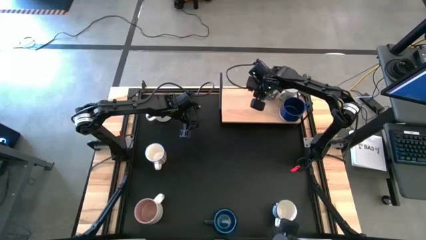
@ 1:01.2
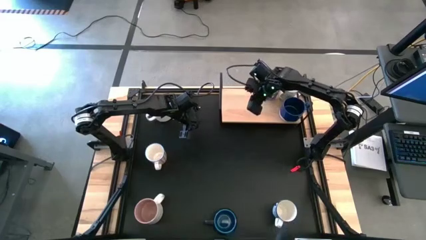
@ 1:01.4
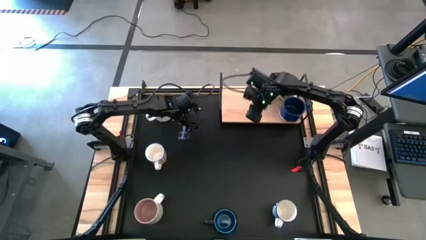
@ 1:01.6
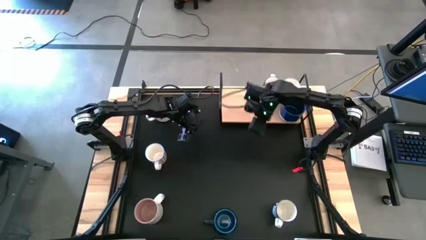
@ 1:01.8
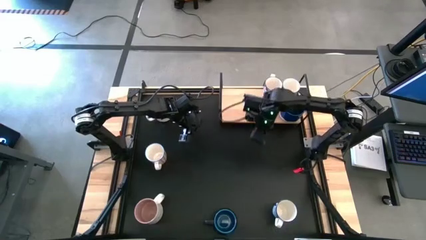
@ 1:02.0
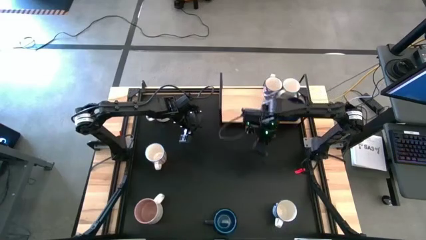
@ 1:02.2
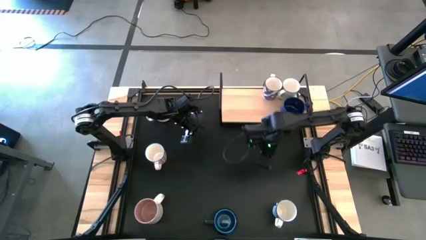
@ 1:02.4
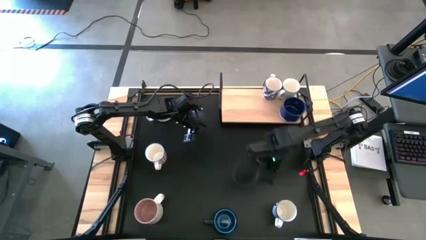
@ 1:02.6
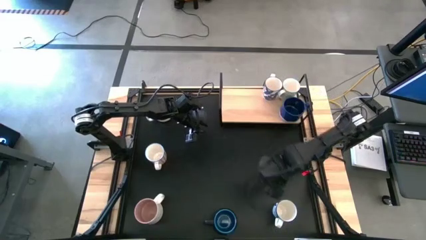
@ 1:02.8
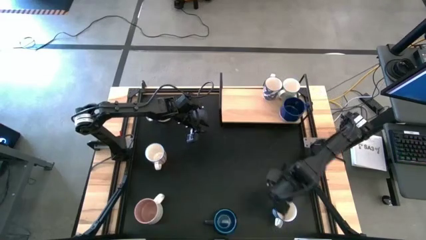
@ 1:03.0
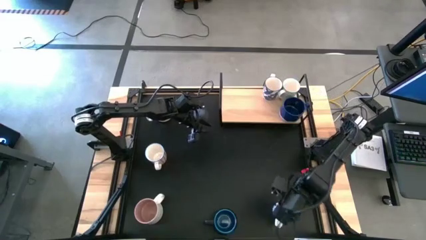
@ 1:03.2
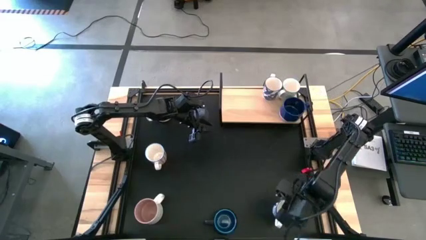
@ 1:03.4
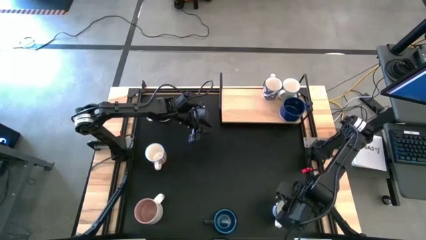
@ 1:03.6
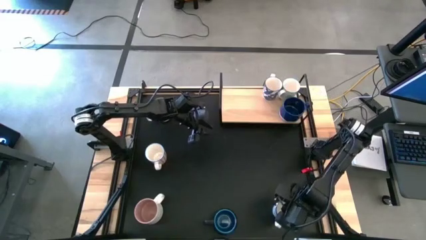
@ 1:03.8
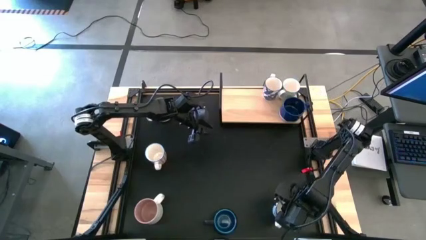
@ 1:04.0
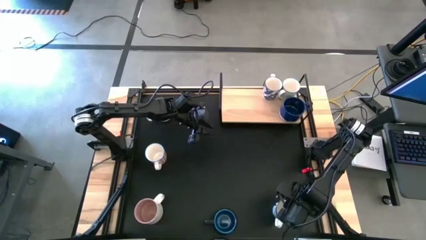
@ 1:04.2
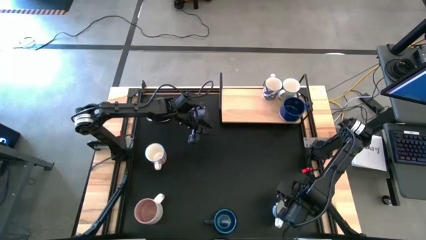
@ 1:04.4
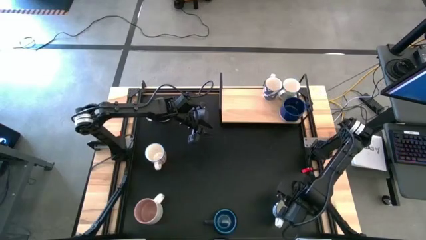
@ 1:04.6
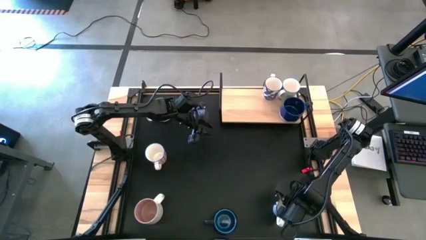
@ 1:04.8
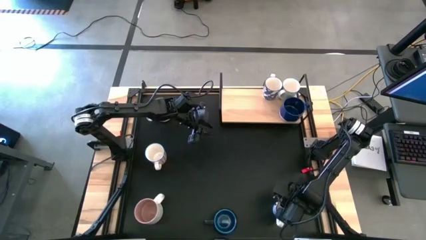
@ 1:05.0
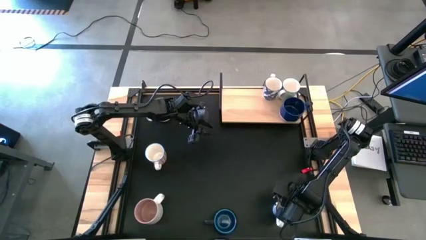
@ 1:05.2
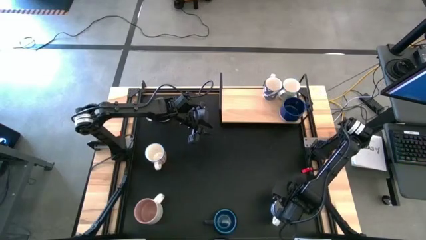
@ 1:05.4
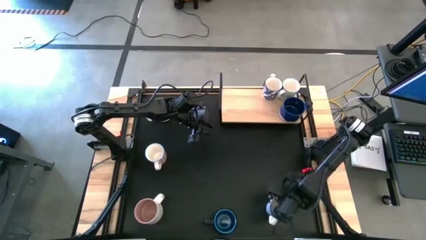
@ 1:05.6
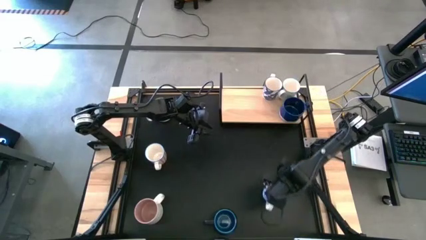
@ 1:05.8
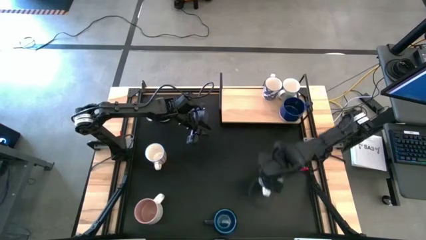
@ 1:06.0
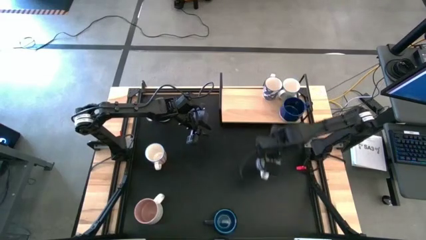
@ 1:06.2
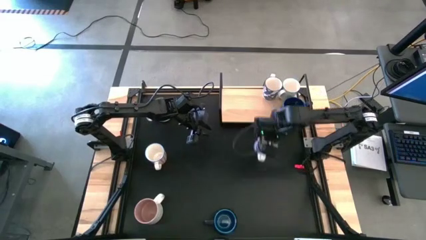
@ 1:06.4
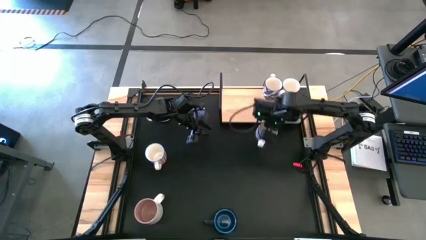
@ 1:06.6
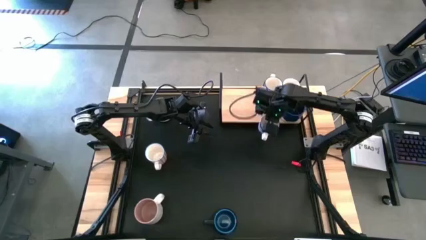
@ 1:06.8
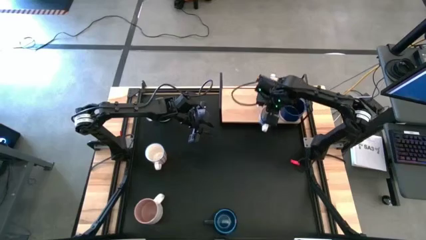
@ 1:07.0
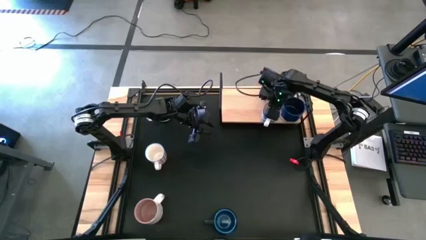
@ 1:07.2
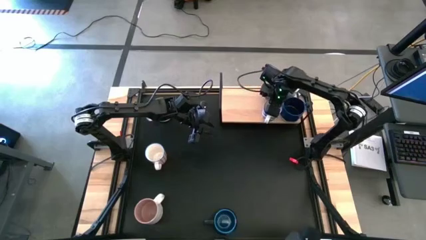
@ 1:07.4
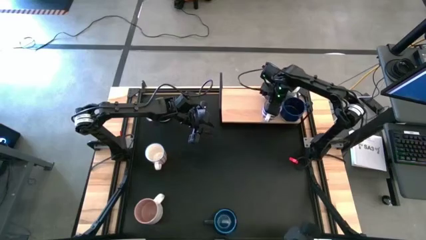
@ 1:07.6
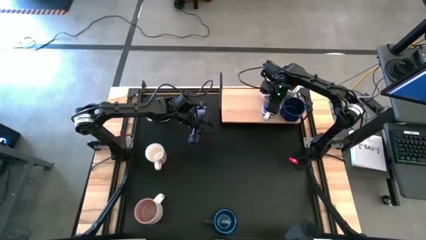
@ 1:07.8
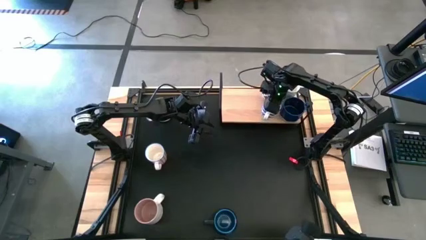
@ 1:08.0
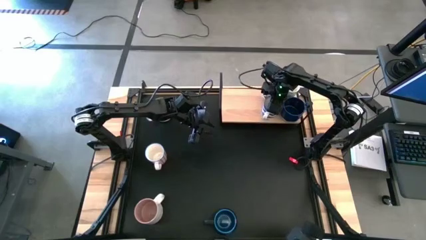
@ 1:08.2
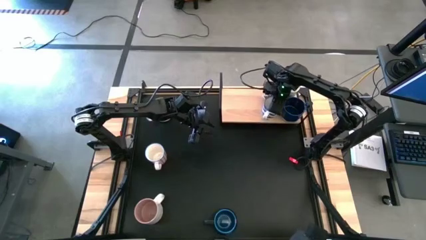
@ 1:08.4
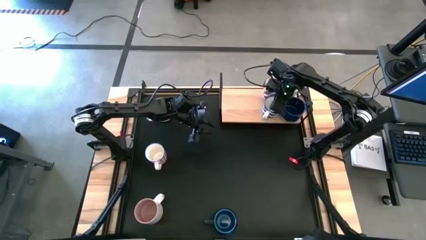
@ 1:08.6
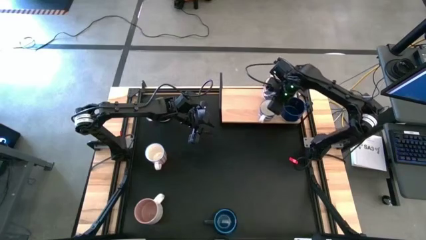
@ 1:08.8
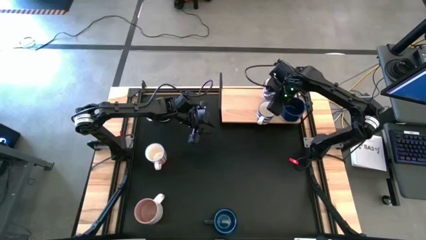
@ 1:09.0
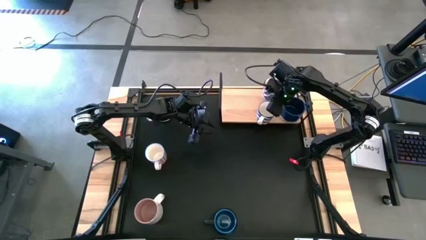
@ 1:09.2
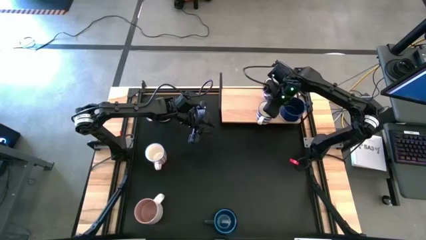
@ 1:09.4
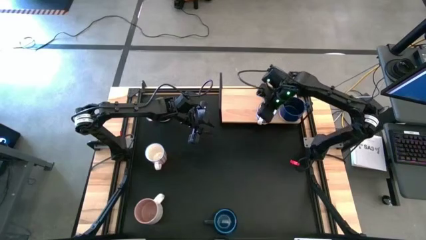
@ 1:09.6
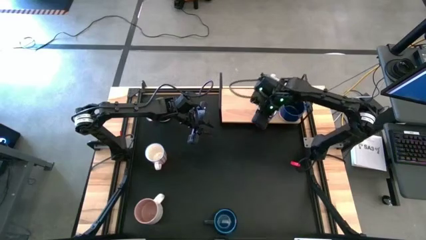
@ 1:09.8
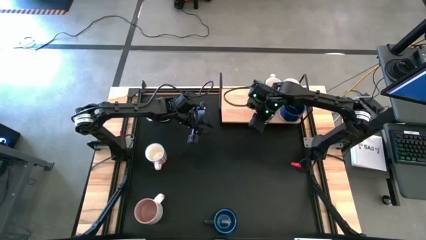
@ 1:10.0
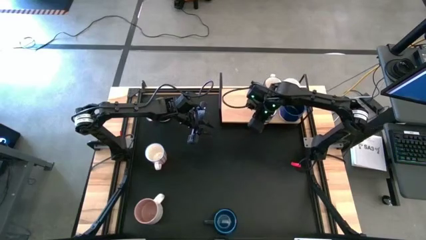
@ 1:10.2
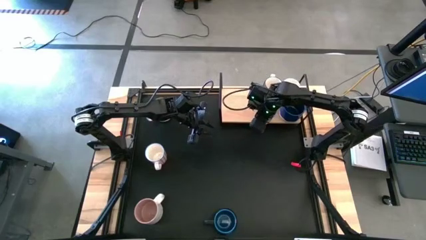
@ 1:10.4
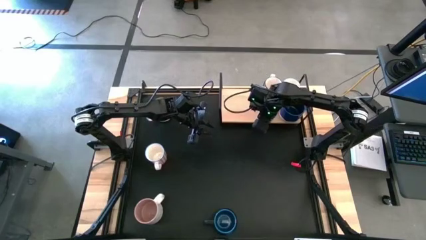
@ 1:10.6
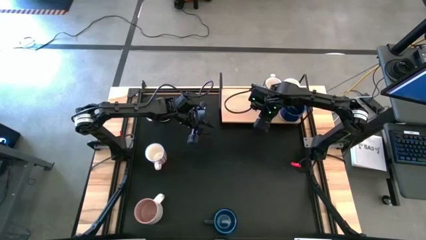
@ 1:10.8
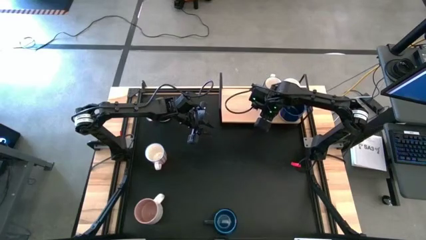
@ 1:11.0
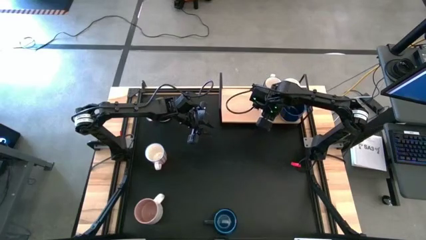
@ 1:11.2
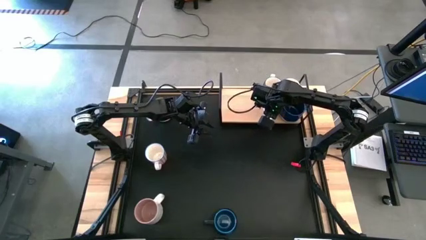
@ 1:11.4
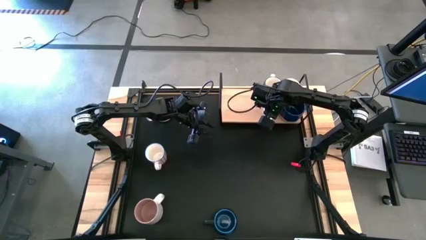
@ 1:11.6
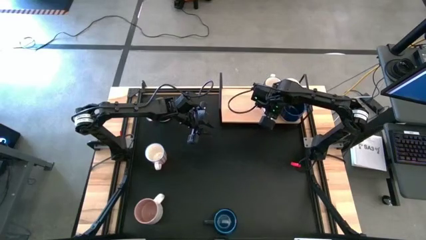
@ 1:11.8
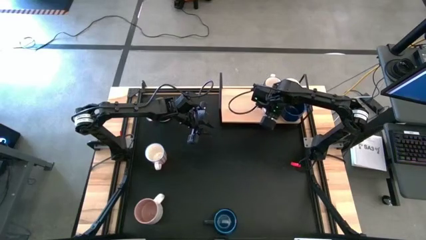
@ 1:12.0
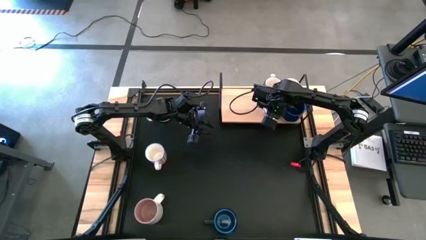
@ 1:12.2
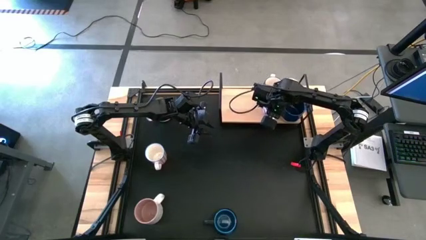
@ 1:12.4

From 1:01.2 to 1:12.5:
Task: Place coffee mugs
Put the blue patterned mug on the shelf

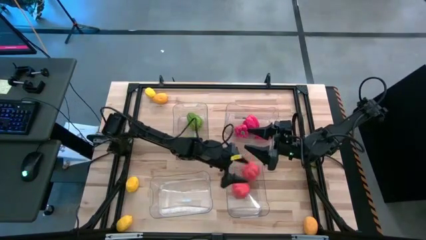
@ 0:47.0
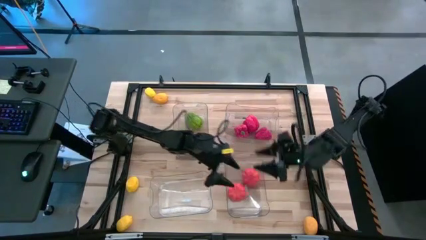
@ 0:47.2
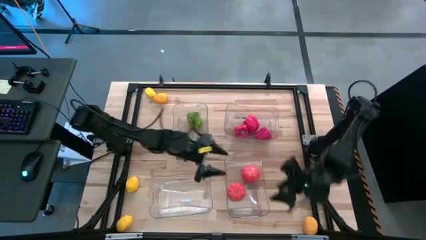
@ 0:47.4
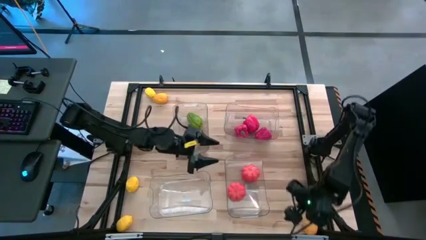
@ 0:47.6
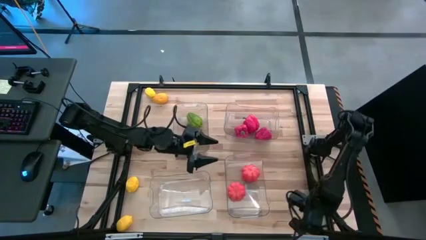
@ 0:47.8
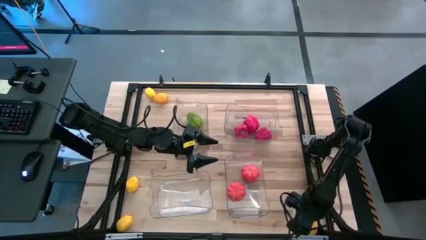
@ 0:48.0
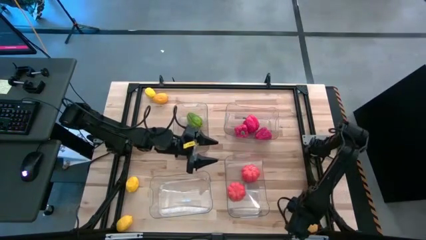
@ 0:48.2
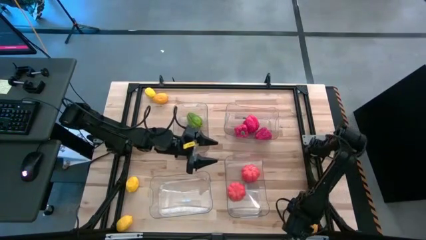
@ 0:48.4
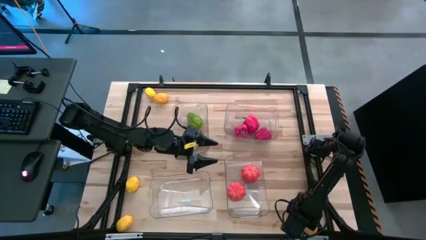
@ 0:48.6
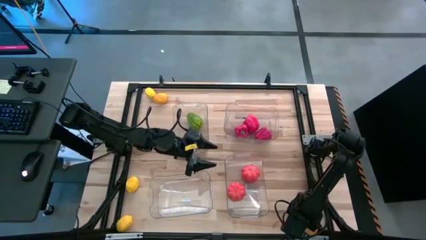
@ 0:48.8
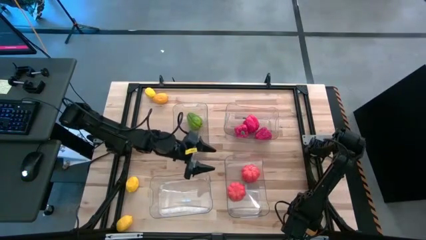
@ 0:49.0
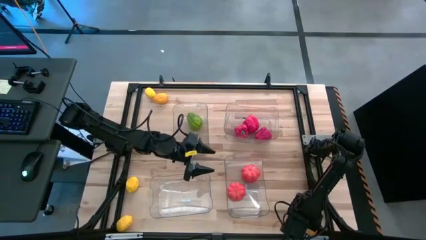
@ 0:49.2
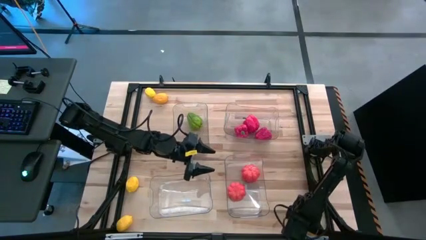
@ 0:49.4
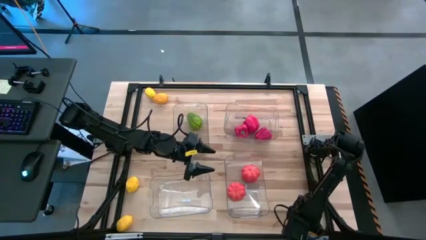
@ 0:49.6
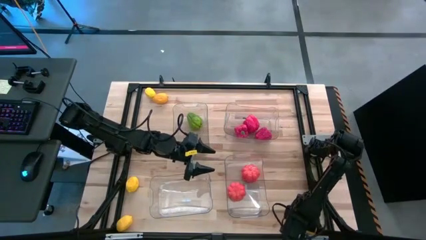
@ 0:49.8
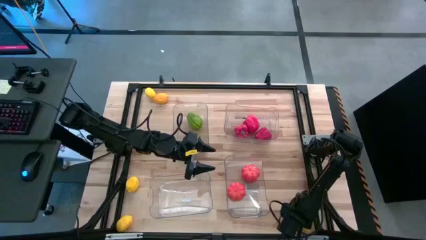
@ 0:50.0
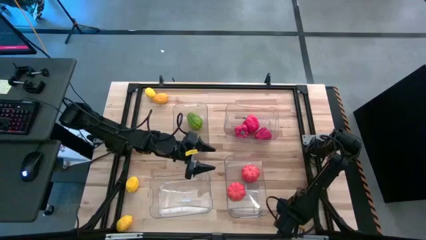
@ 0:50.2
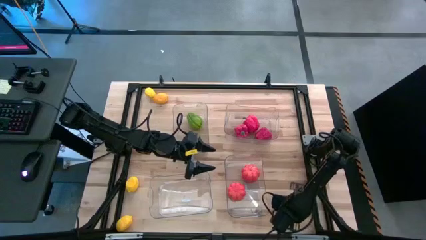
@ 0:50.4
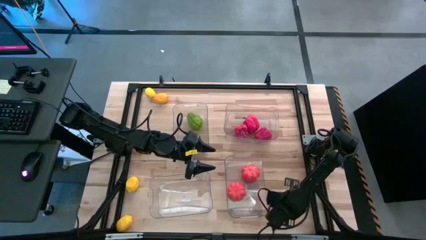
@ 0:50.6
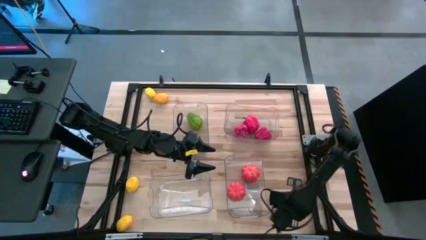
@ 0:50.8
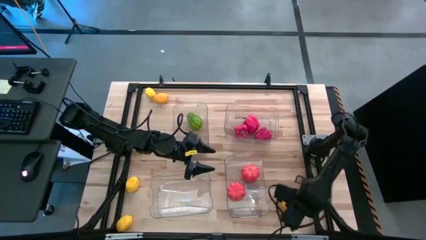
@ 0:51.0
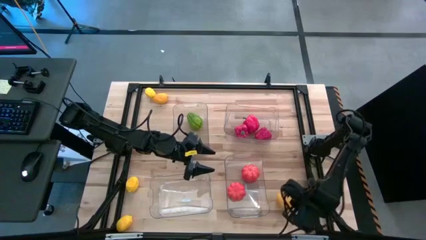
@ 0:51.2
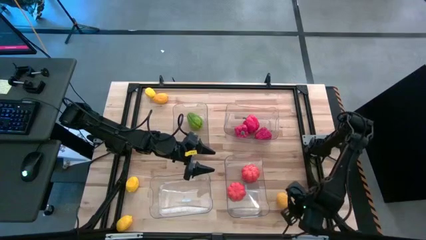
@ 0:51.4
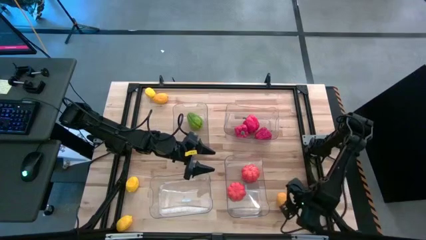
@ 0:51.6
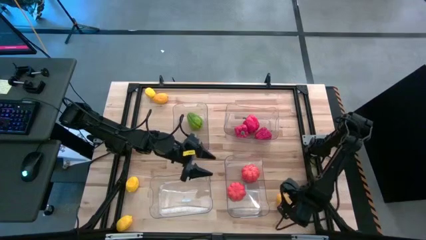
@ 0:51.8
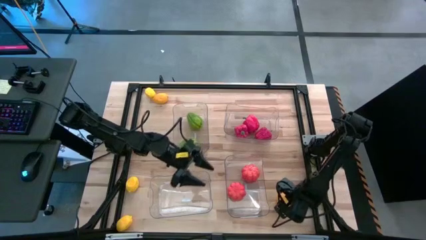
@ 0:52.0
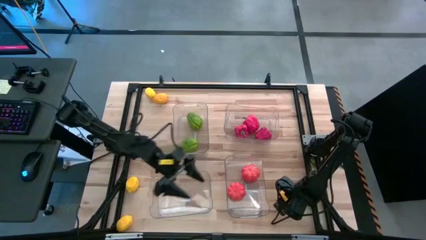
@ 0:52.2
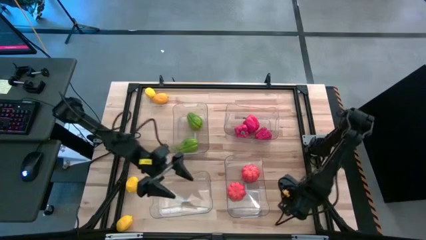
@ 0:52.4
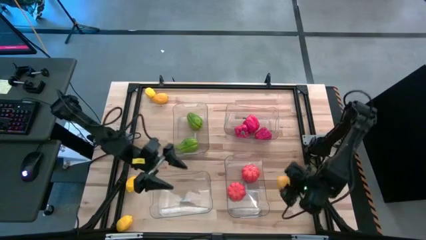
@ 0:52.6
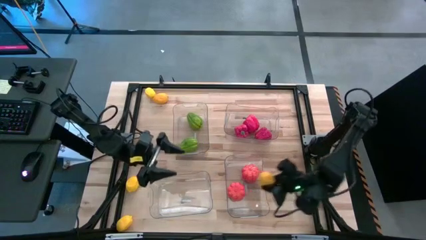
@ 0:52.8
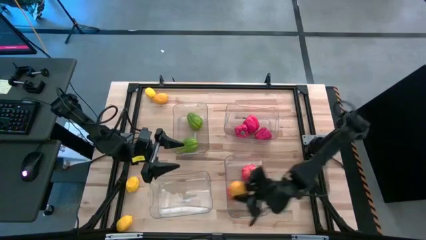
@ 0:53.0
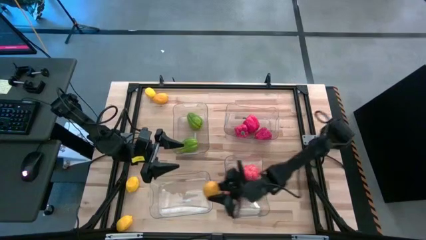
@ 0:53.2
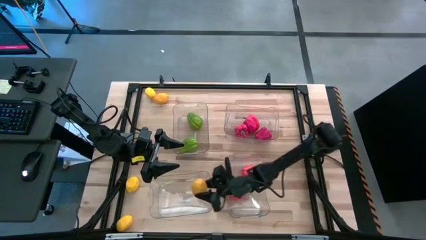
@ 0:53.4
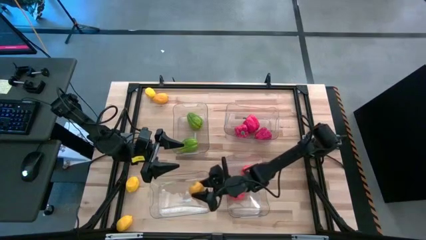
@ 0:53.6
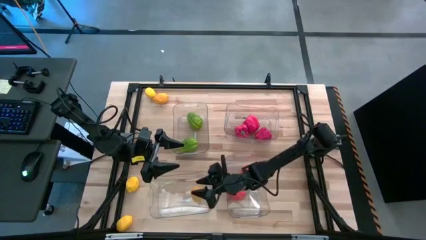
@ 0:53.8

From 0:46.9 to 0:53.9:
Task: Sort produce into baskets
Put the bottom right yellow lemon into the bottom left transparent bin
